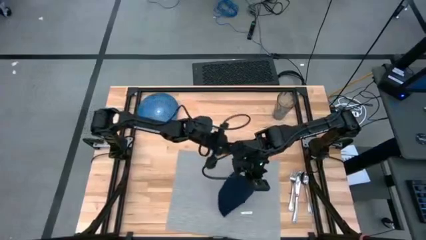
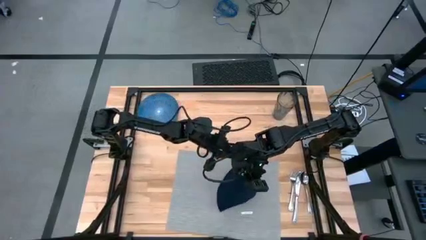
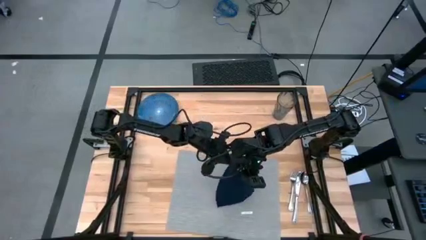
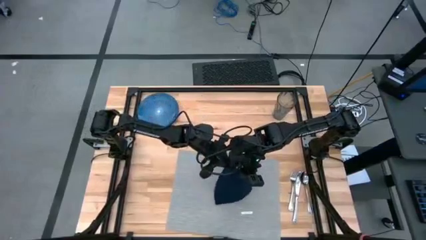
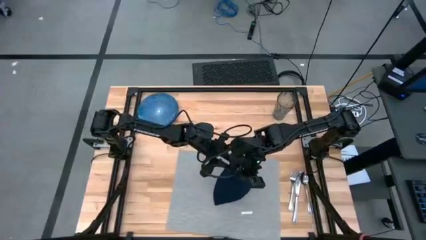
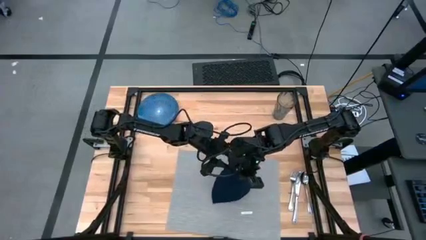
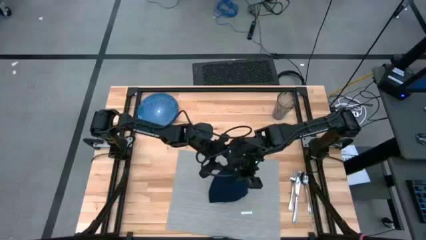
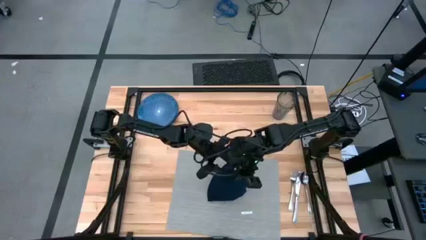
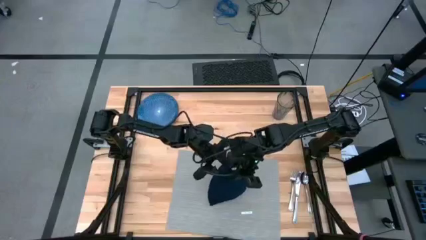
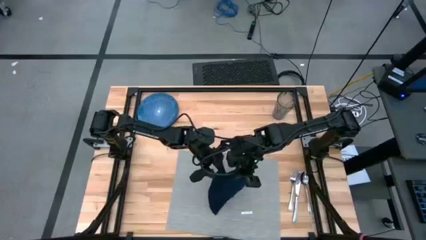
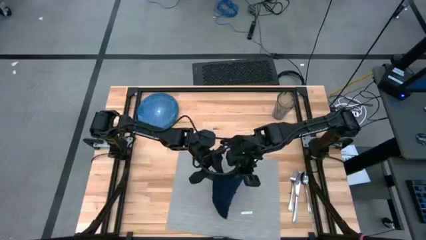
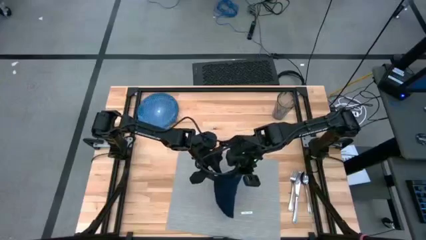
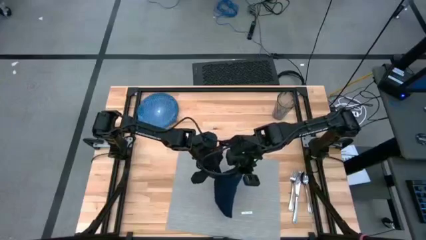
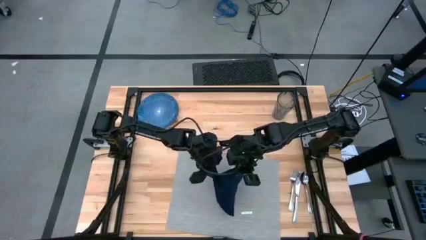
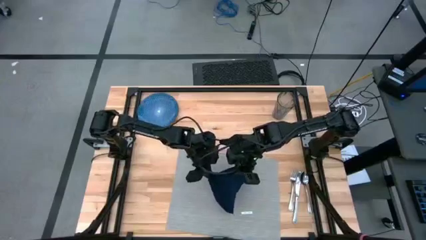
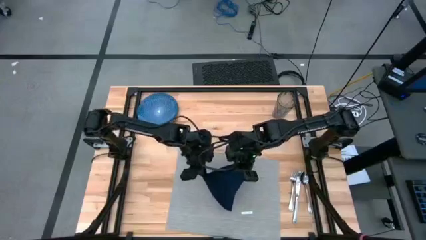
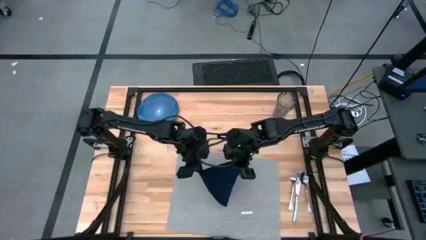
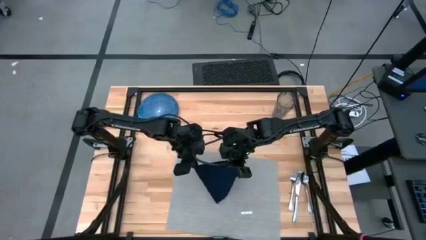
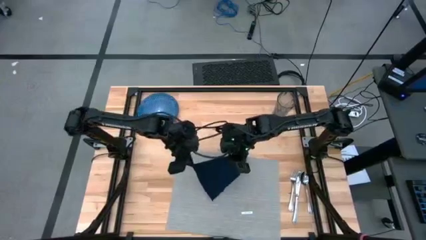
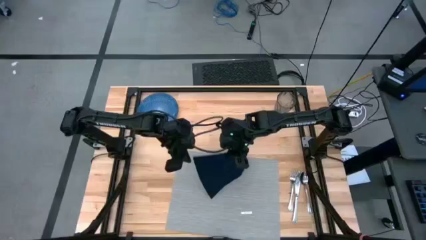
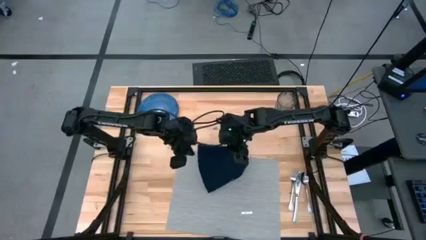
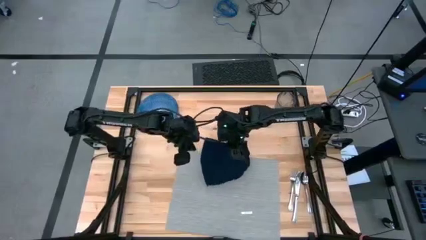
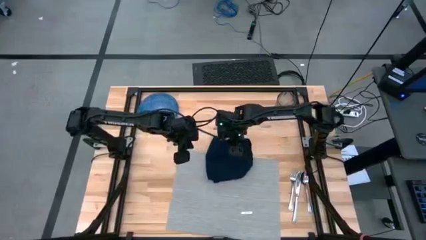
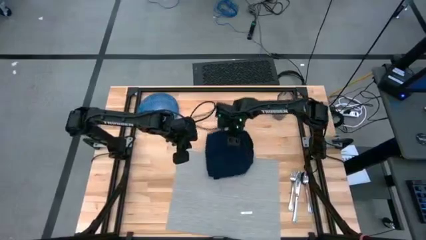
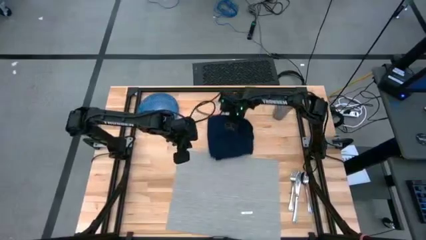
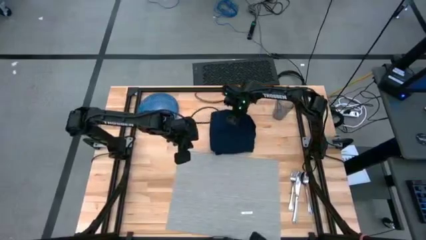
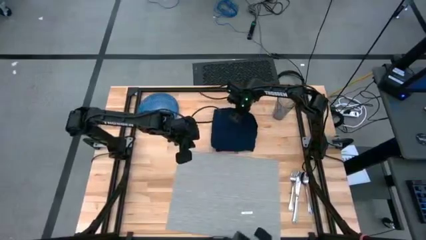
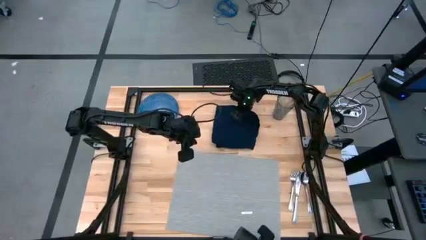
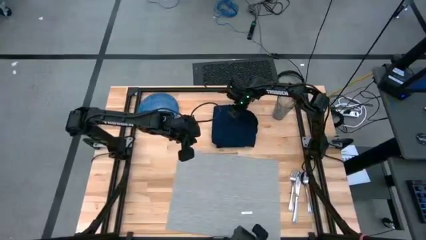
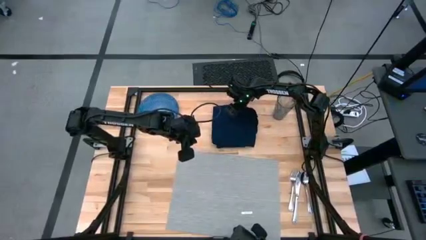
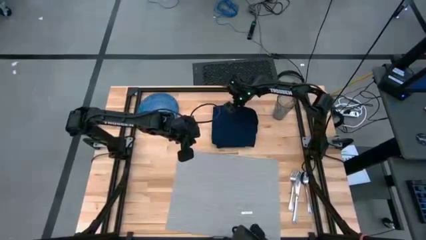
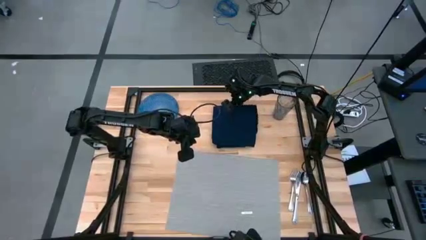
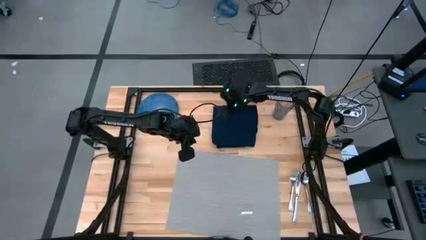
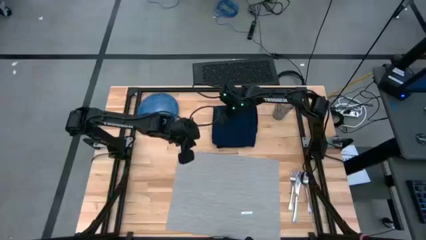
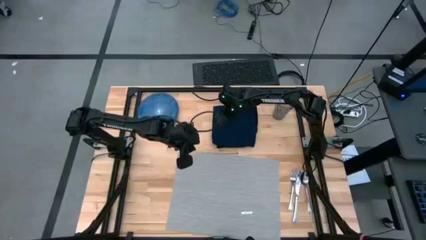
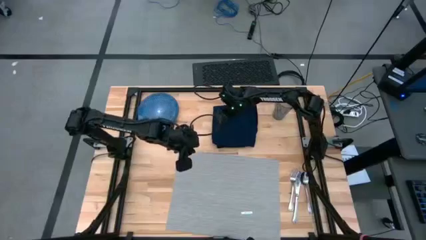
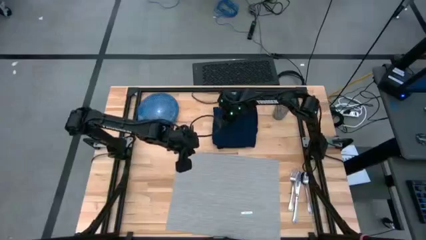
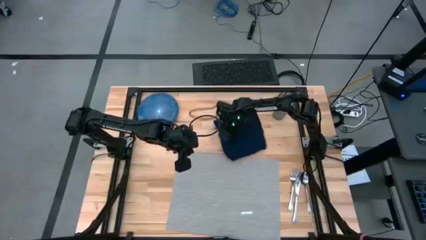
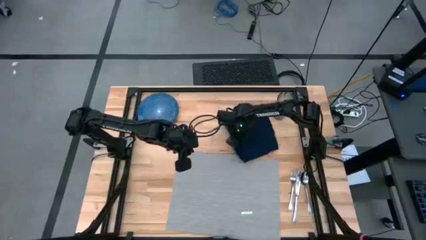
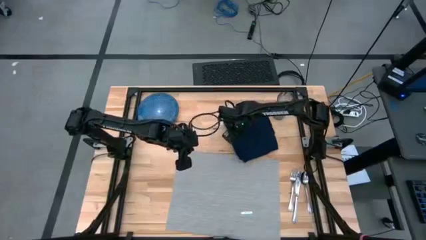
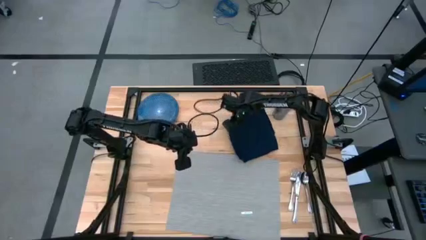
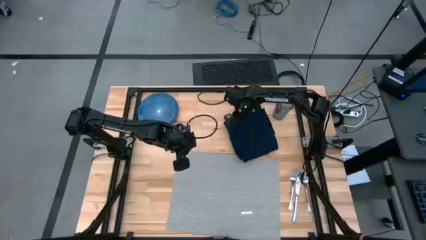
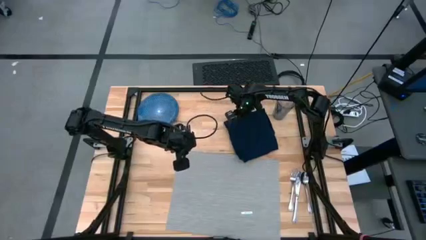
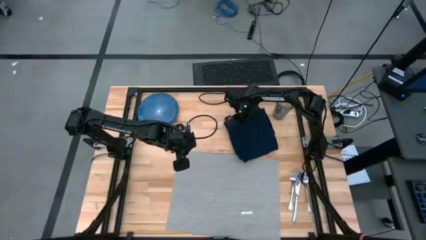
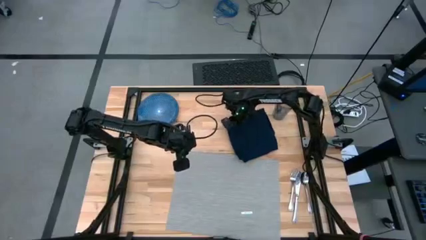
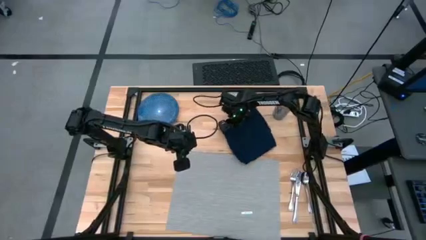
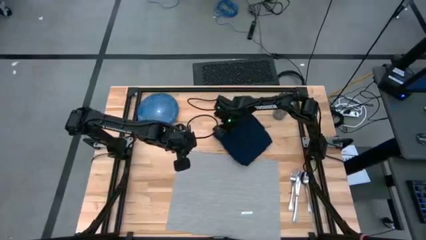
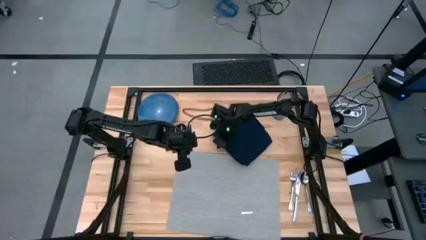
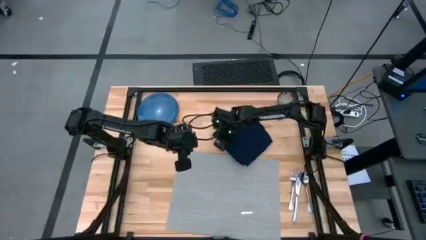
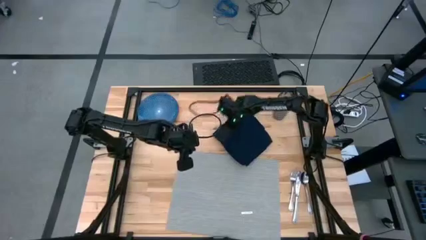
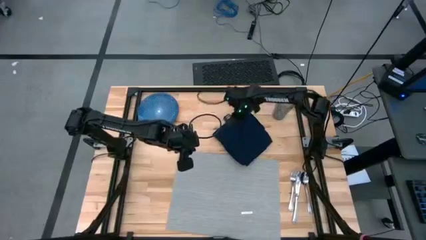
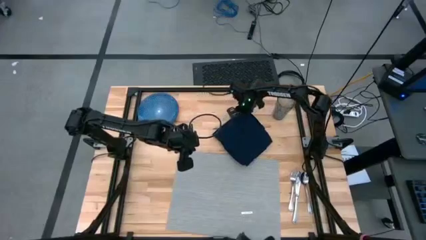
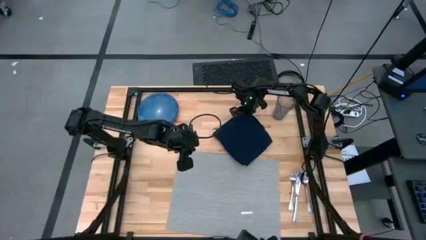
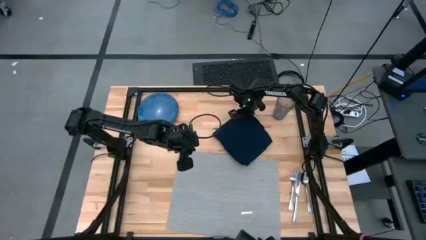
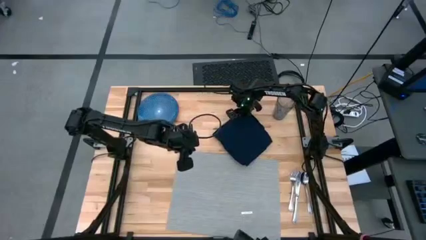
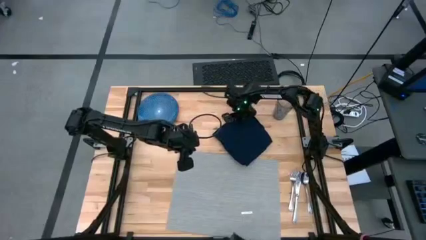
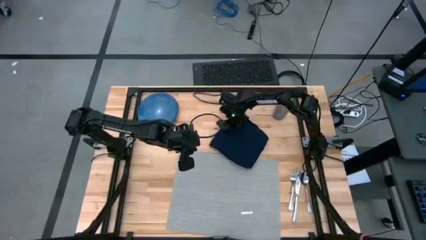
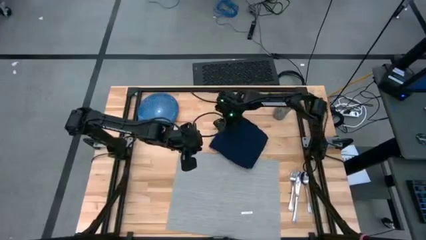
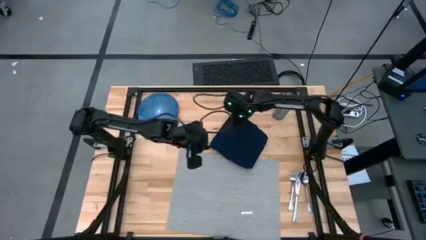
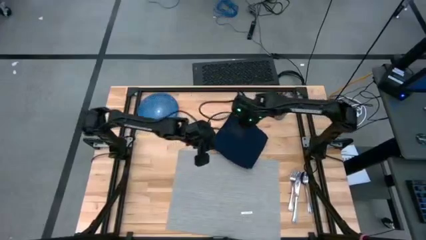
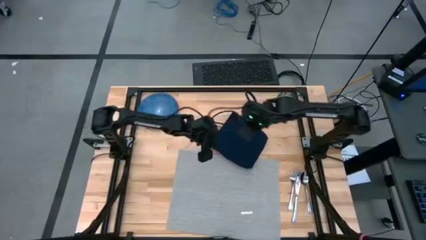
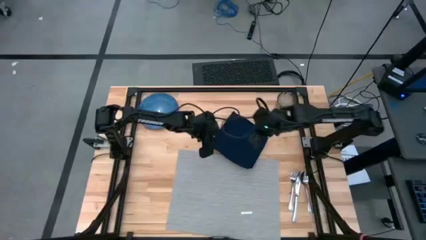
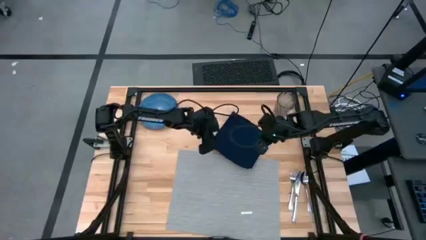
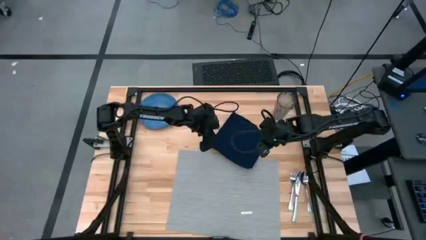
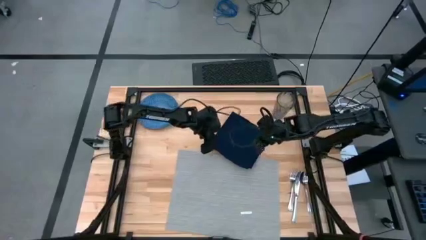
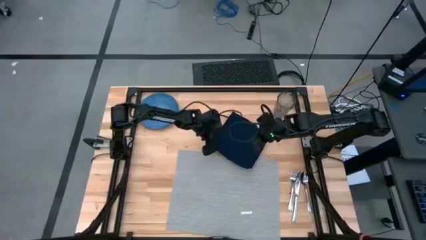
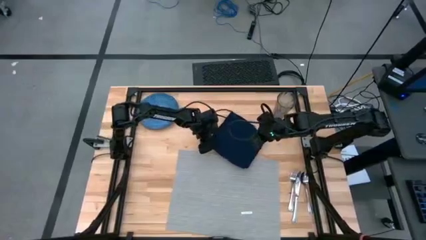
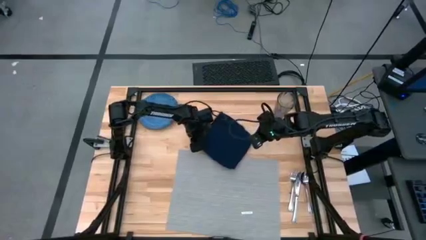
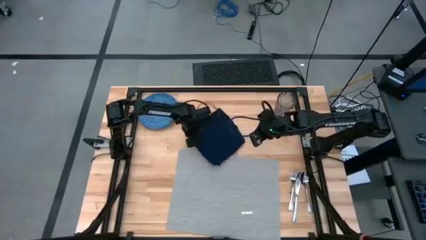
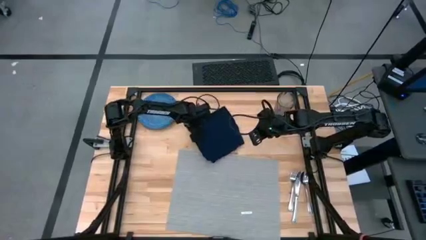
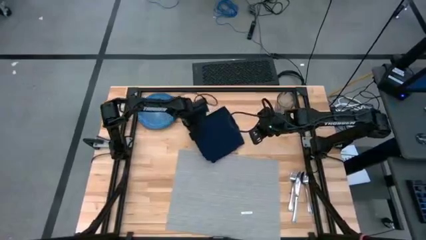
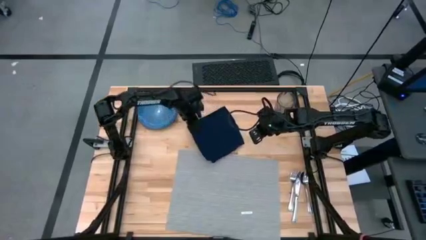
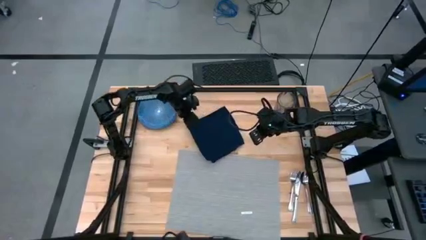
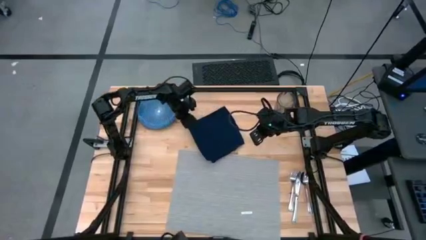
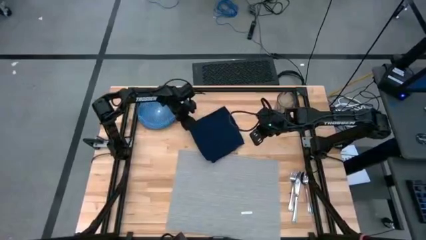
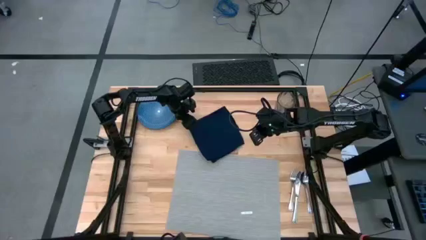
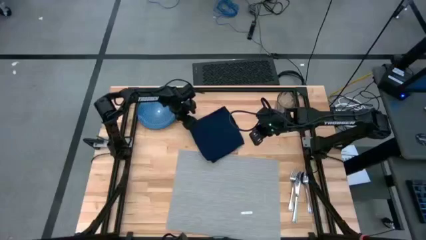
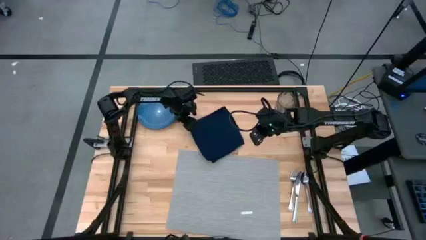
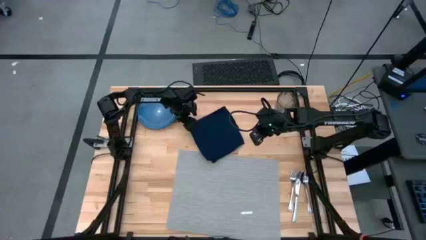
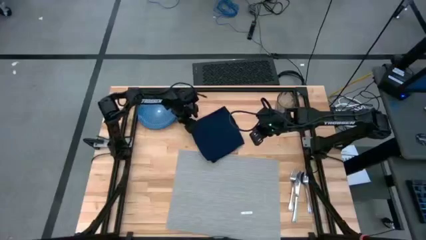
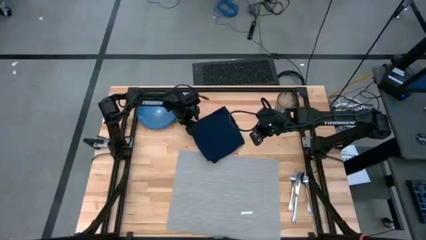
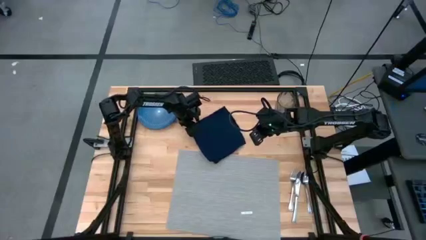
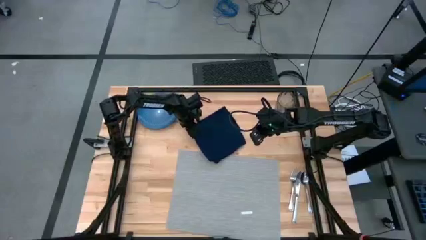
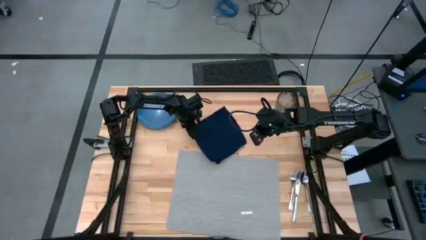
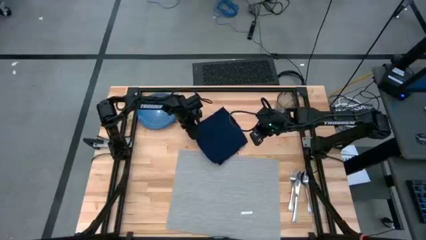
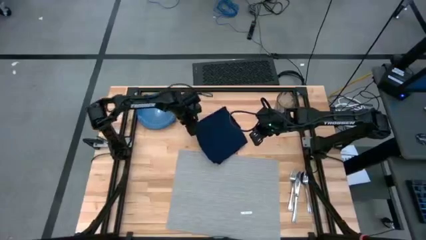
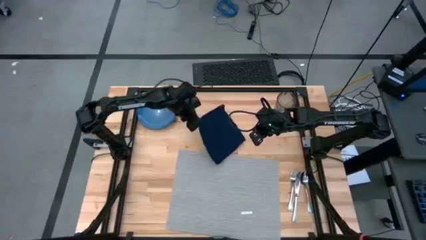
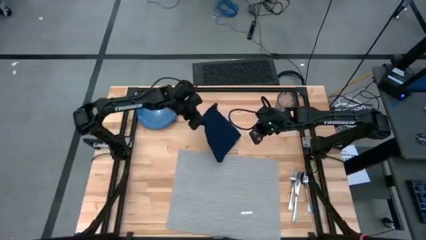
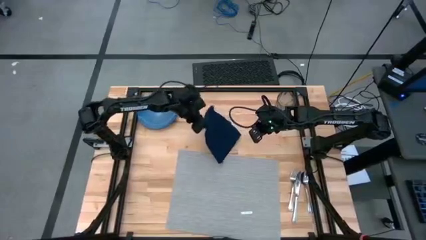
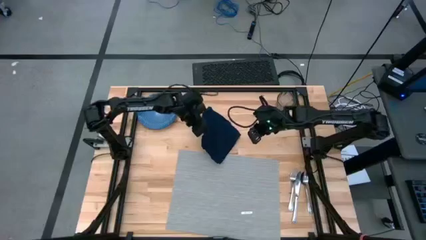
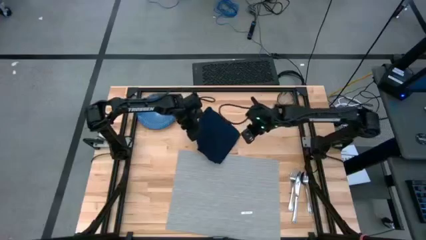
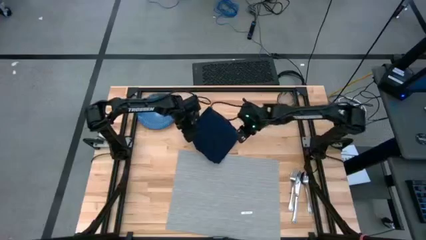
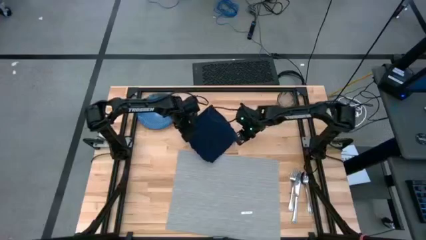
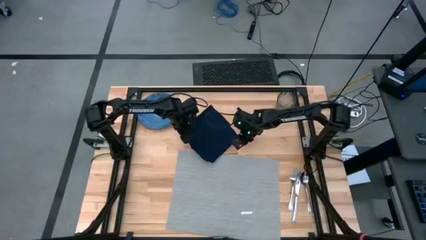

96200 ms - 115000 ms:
Task: Set table place
Fold the dark blue napkin
